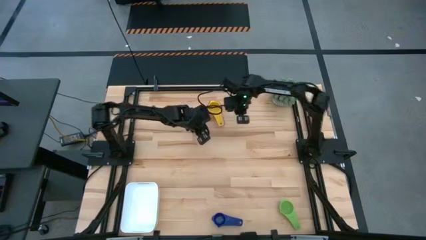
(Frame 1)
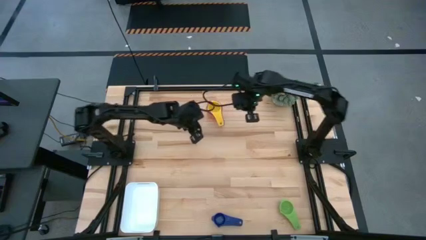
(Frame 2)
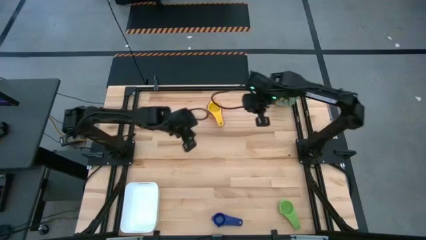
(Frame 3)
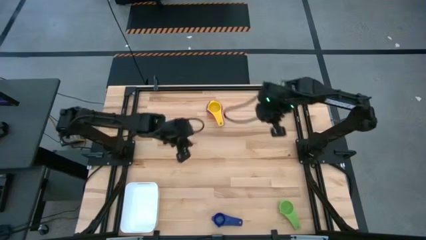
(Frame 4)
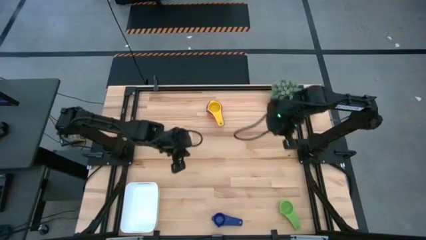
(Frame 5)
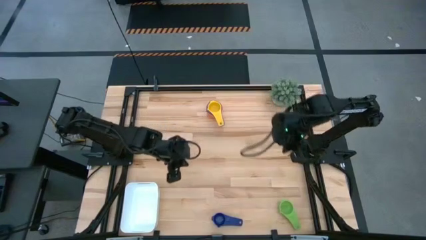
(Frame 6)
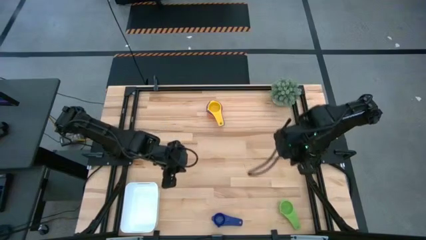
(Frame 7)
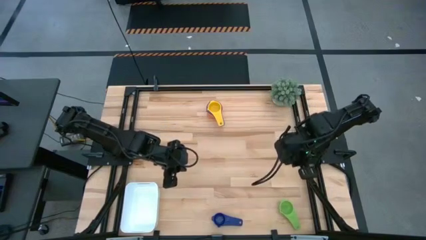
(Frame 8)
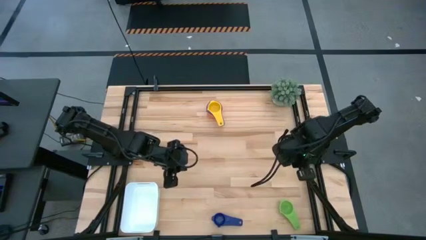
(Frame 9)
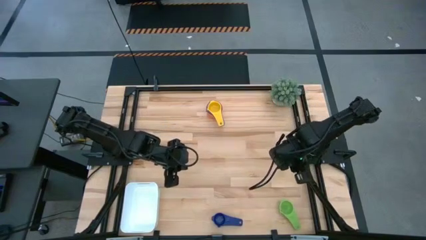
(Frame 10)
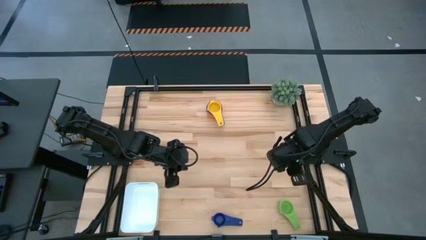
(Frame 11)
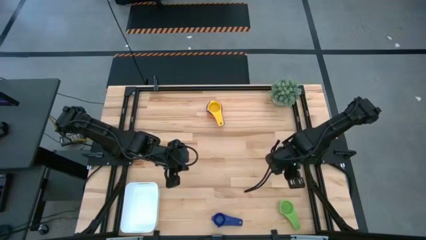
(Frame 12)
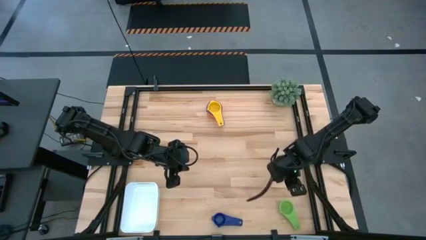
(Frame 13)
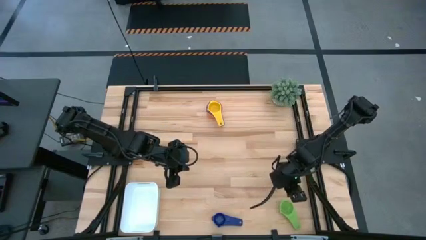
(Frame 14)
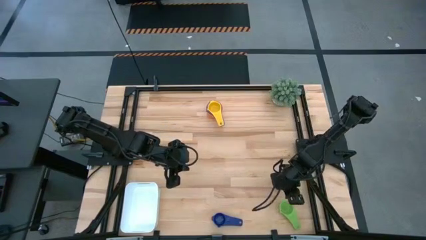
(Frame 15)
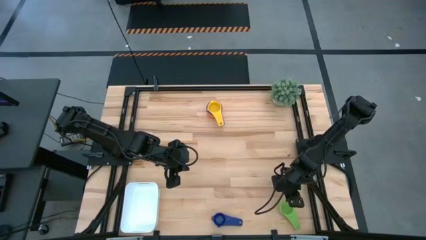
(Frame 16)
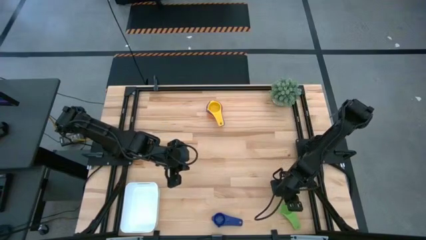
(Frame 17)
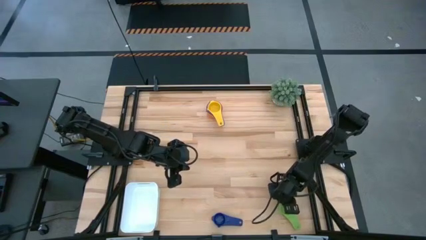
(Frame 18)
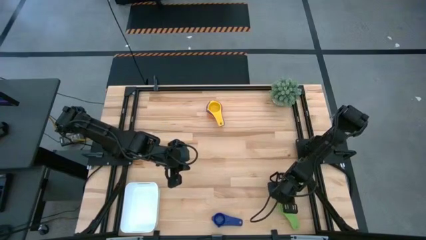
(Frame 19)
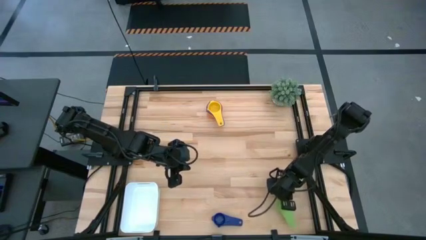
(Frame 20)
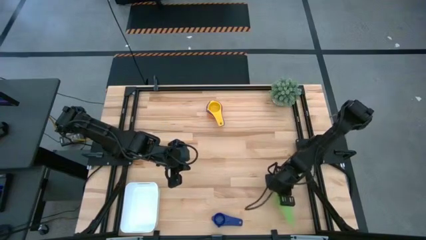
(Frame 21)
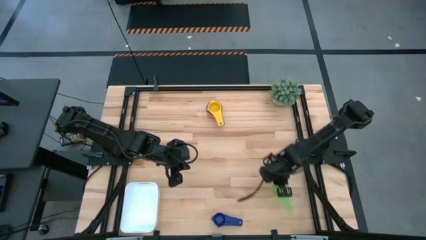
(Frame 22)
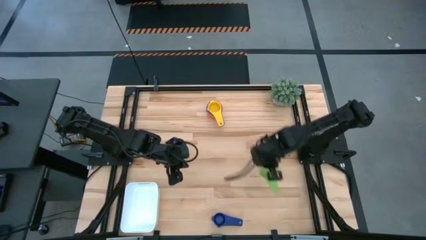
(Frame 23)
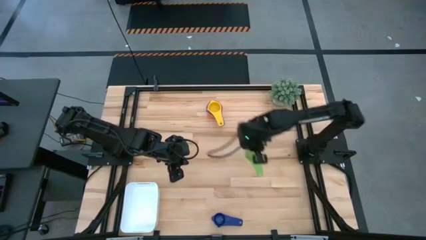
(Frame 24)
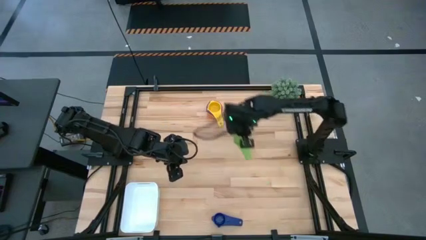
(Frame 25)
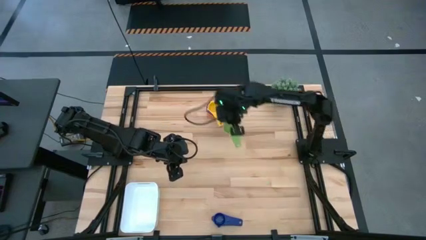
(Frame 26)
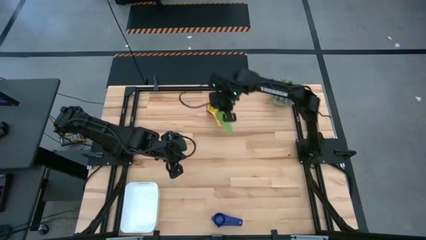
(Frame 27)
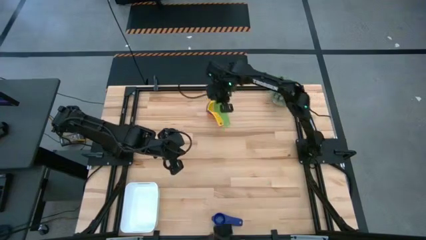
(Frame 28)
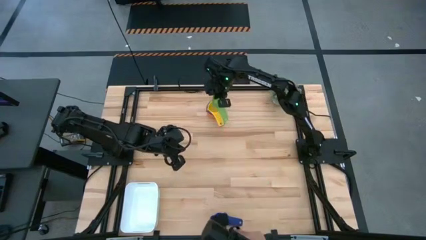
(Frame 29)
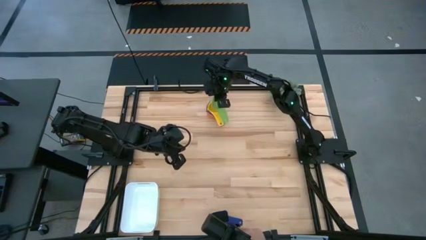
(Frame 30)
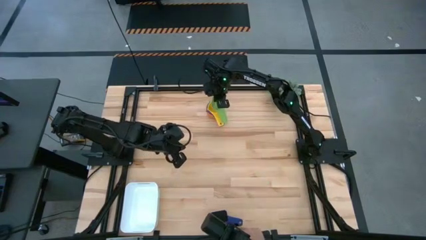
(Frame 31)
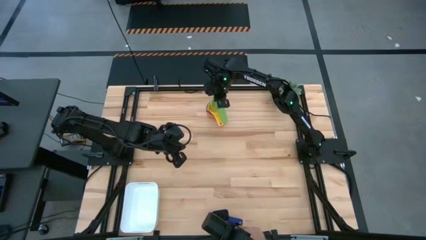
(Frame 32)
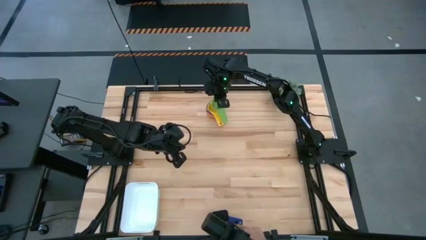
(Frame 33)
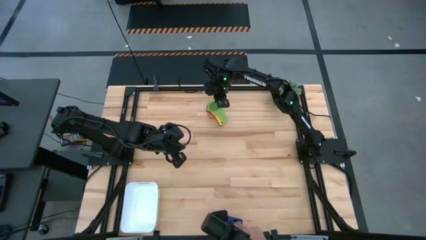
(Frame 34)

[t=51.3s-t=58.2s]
Task: Nest measuring cups in basket
Stack the green measuring cup on top of the yellow measuring cup

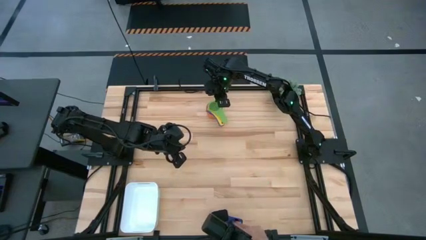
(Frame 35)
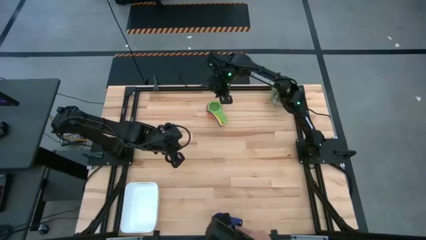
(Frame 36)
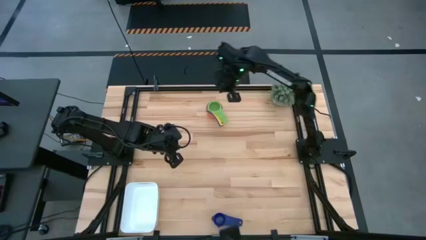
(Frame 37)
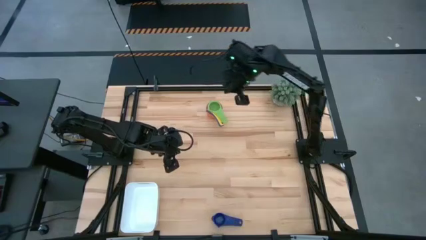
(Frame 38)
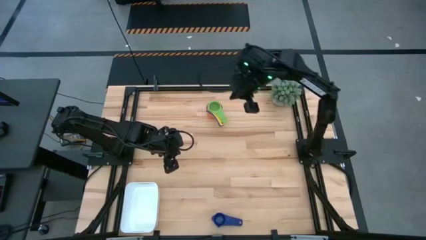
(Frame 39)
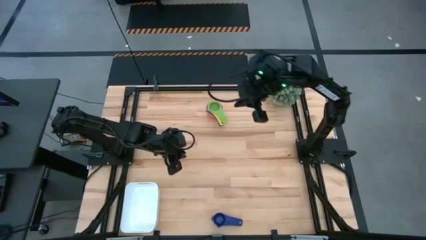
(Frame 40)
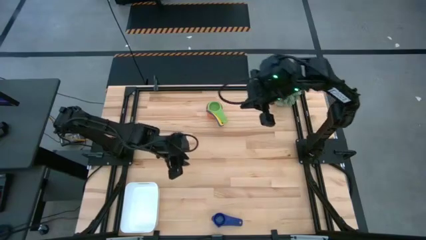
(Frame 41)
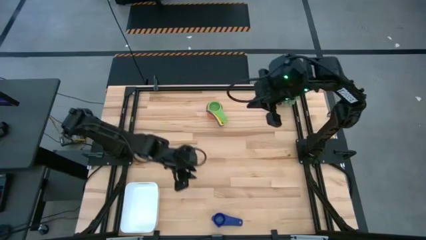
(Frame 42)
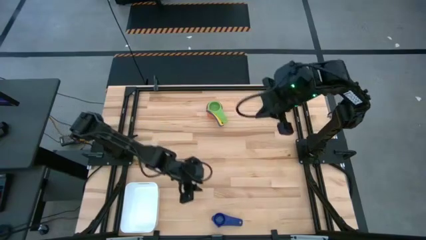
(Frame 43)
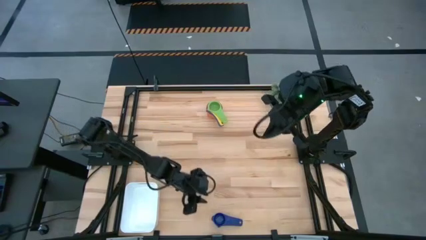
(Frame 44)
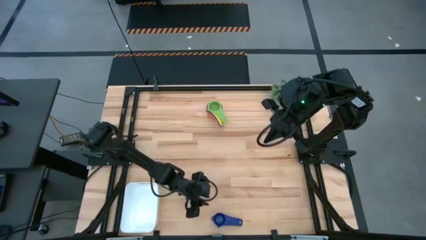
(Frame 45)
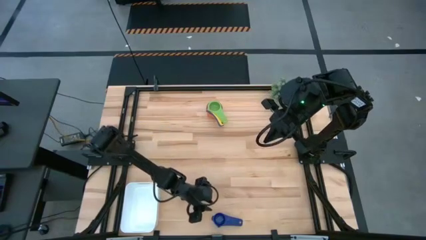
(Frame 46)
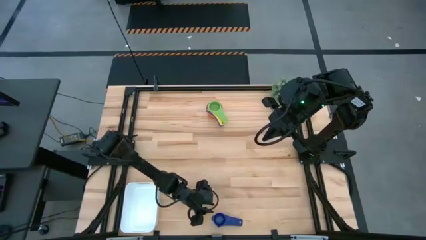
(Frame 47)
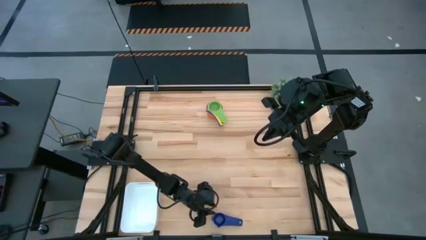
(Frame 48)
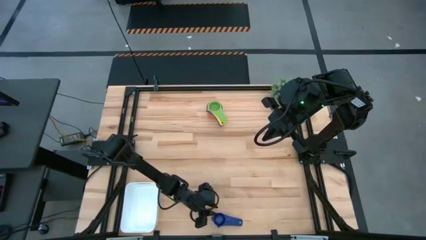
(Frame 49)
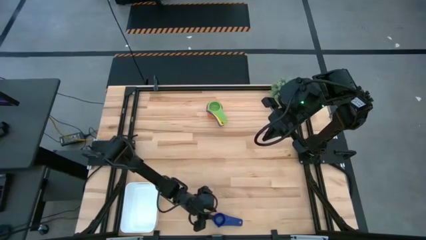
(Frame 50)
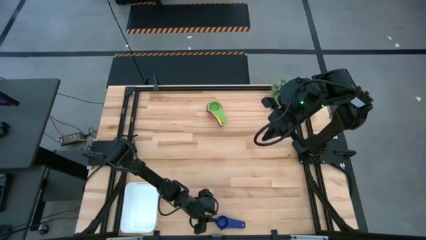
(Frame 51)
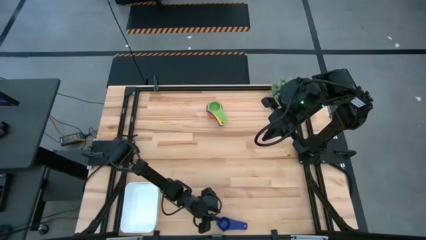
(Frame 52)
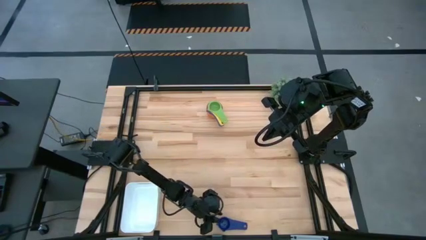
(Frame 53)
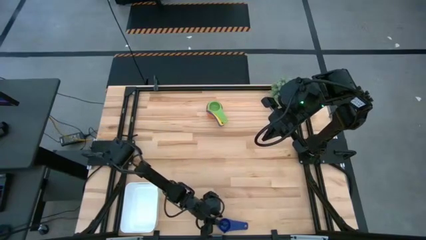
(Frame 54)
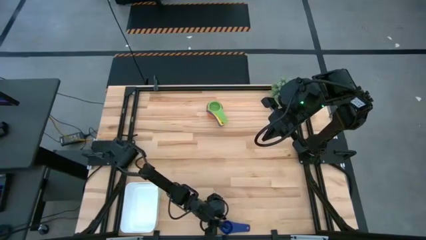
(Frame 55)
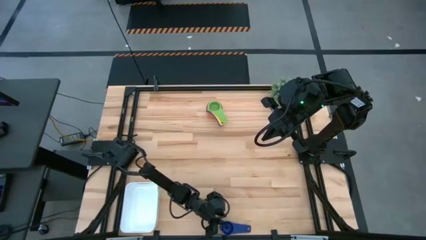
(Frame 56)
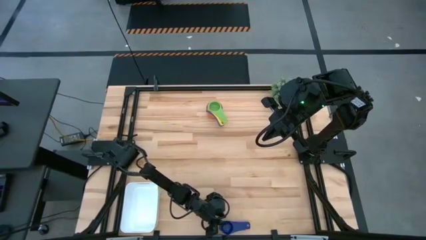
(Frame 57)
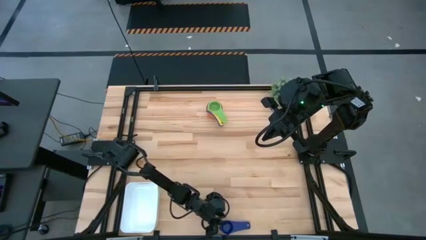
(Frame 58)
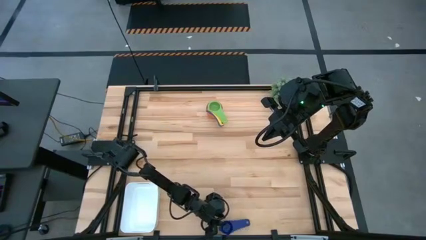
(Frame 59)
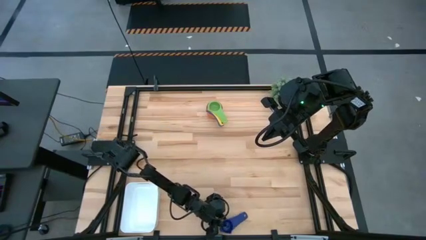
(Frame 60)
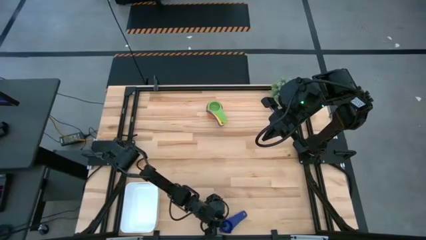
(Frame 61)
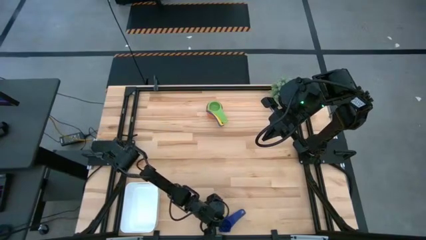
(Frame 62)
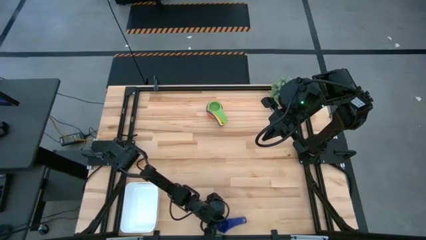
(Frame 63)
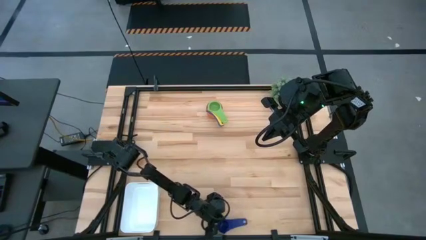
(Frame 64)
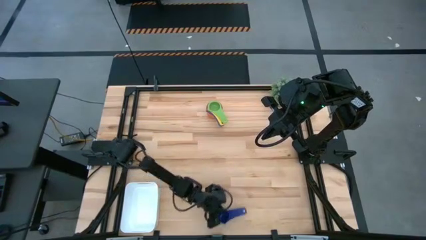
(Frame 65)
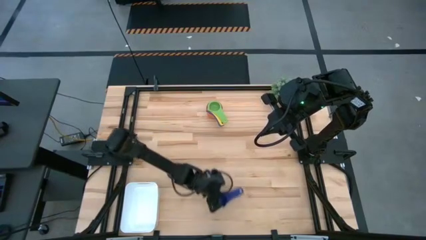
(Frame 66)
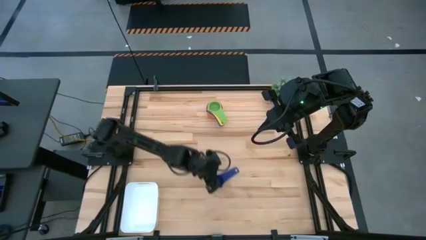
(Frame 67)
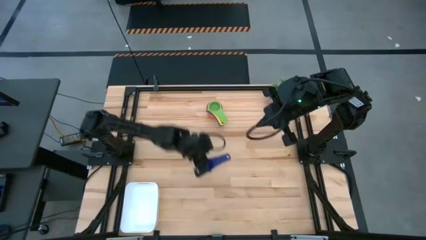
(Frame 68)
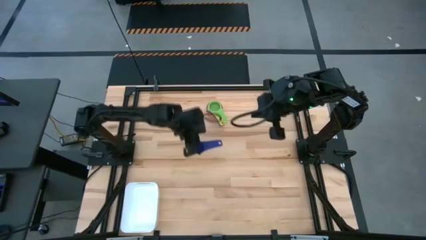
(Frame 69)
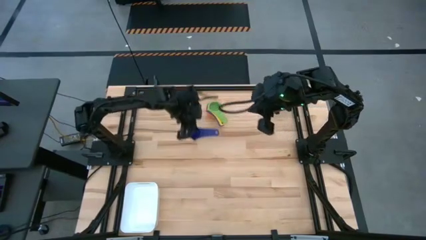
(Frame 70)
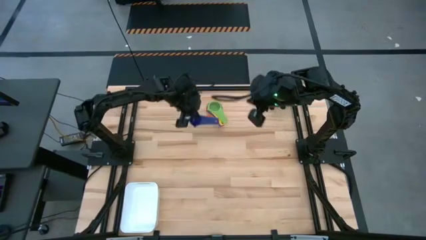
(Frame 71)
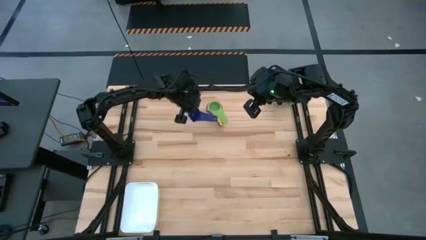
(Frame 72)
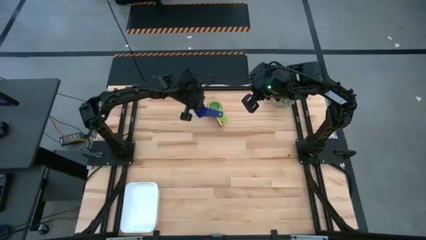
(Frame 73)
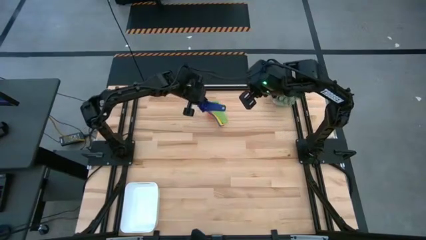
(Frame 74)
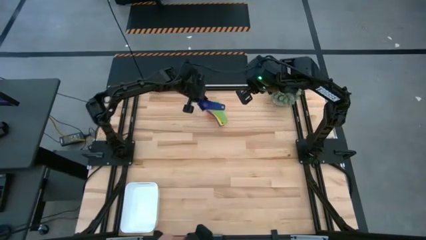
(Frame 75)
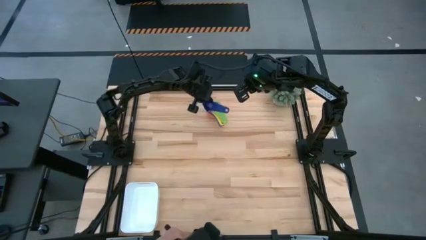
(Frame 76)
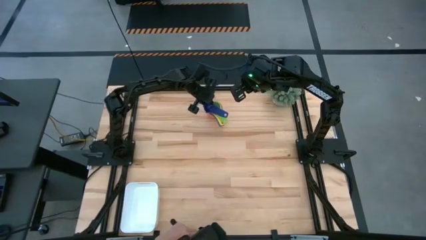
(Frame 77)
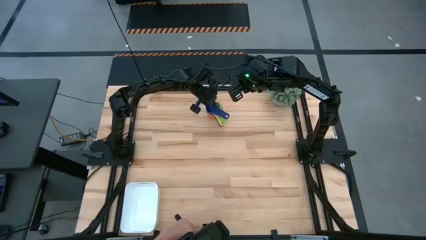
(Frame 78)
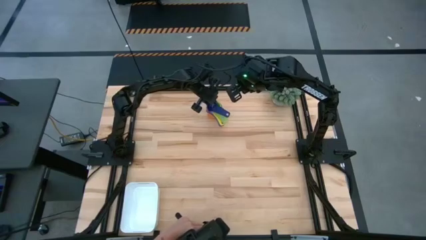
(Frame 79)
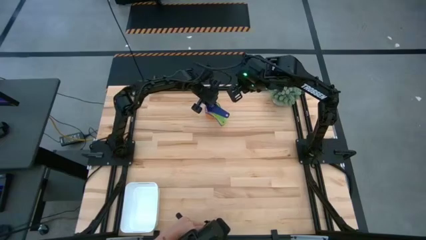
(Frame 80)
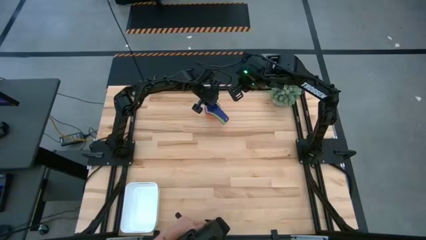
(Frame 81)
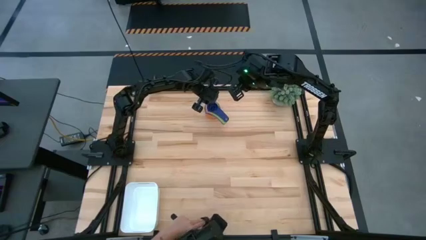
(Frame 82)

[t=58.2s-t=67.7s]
Stack the dark blue measuring cup on top of the green measuring cup

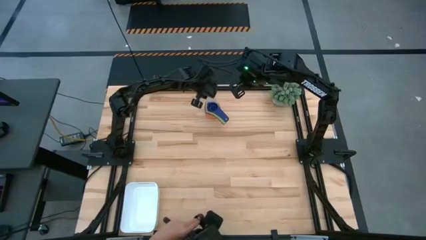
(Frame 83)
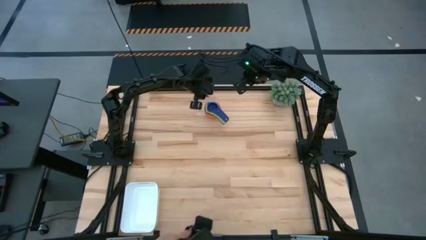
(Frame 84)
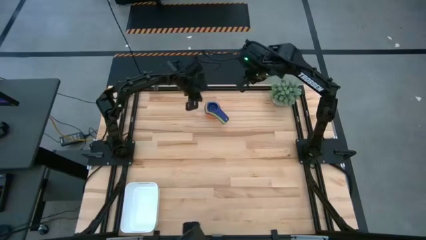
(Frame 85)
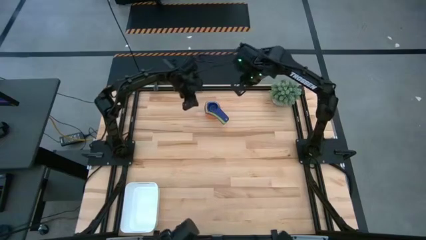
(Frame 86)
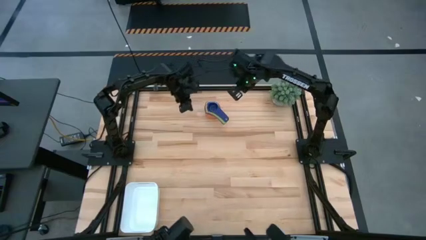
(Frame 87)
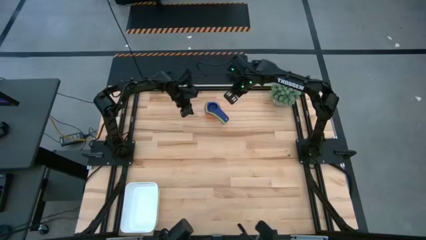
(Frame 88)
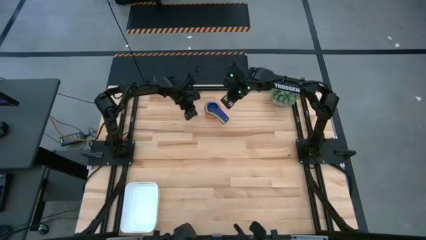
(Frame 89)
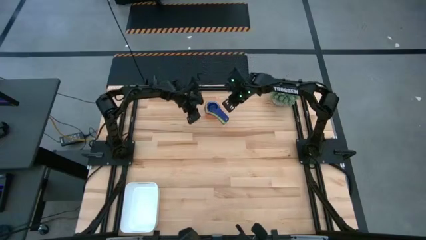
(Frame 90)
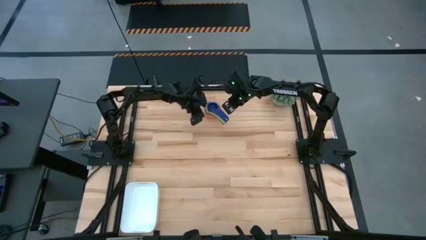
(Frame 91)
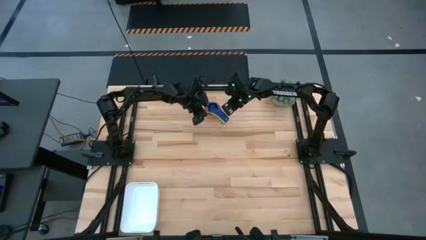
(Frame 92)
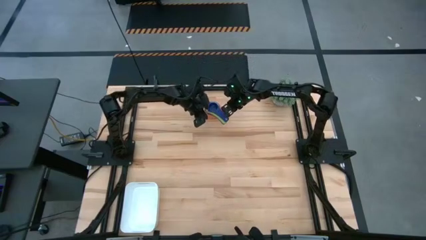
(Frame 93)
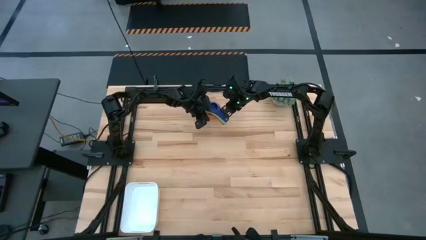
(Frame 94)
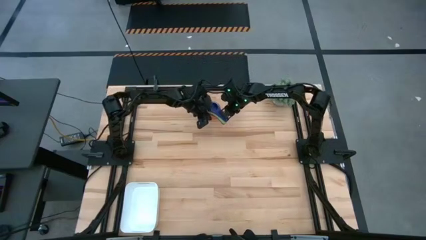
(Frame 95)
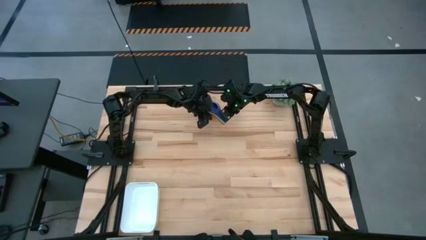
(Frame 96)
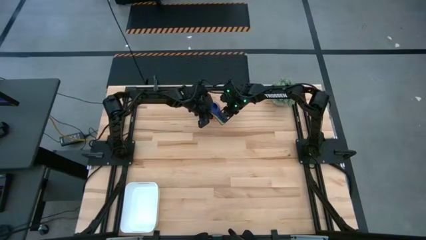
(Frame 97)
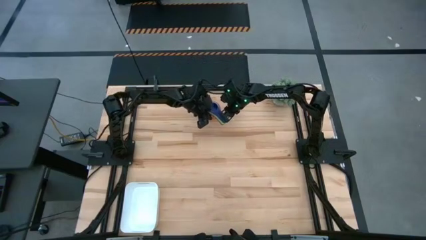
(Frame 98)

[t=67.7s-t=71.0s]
Adjust the stacked measuring cups
